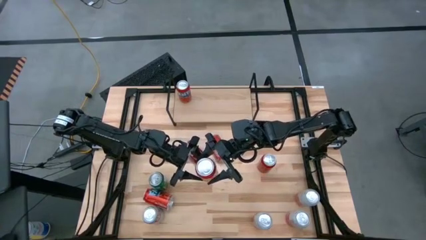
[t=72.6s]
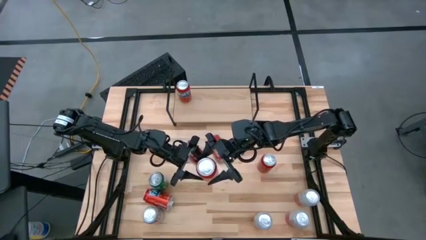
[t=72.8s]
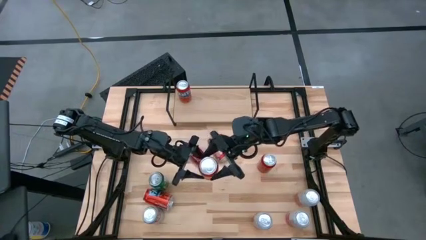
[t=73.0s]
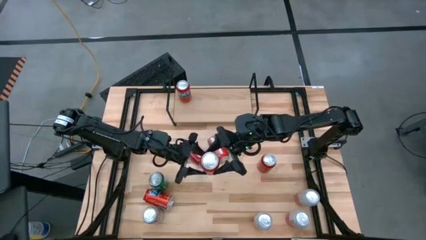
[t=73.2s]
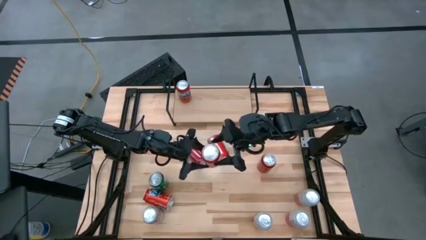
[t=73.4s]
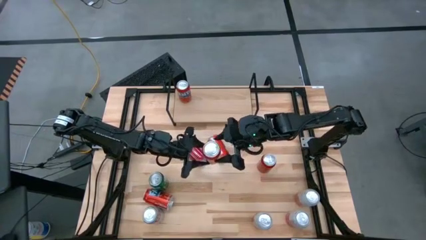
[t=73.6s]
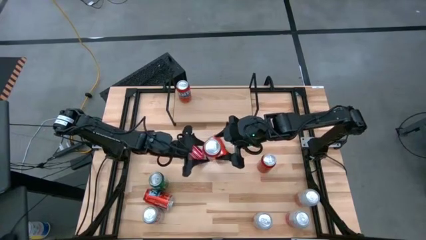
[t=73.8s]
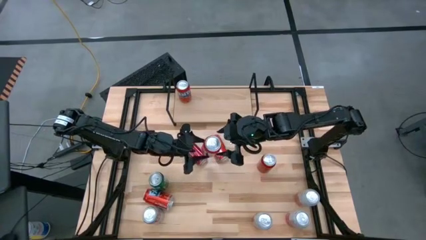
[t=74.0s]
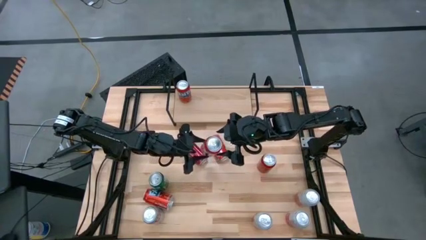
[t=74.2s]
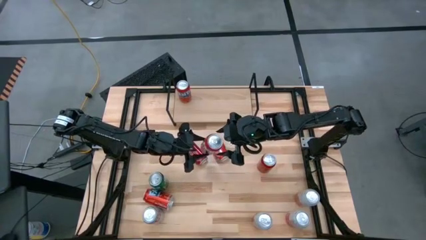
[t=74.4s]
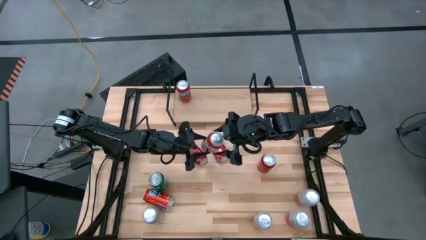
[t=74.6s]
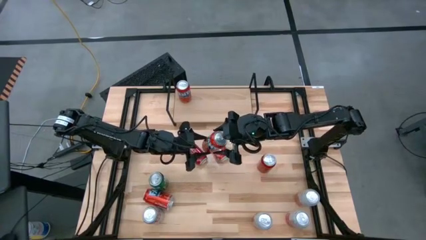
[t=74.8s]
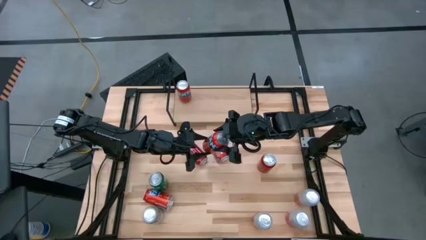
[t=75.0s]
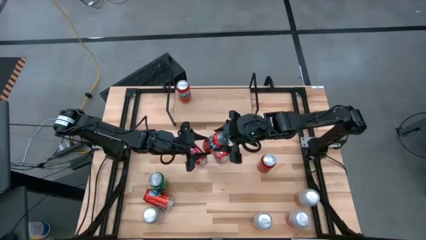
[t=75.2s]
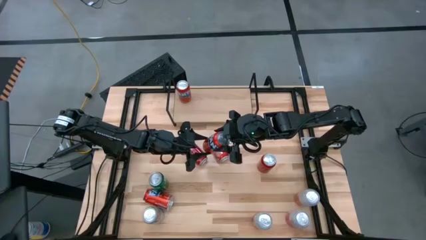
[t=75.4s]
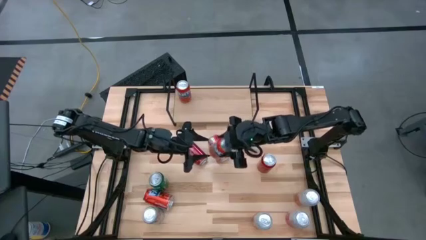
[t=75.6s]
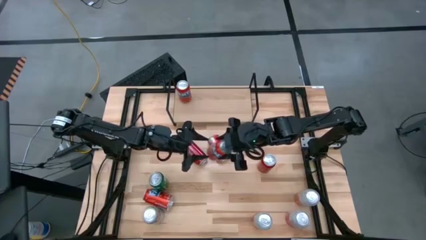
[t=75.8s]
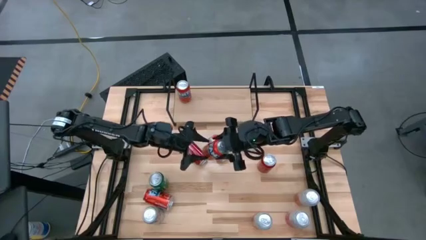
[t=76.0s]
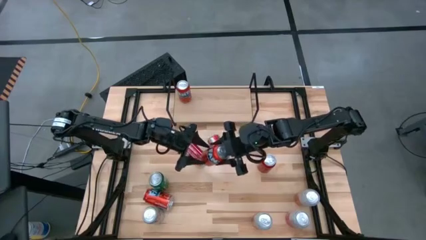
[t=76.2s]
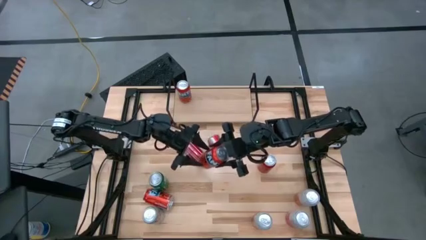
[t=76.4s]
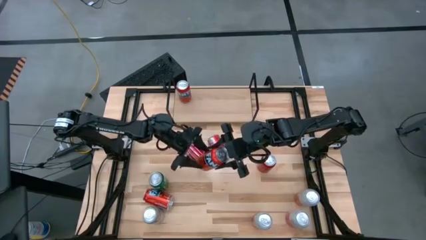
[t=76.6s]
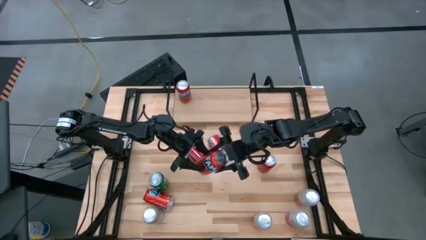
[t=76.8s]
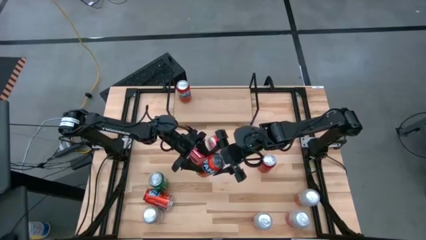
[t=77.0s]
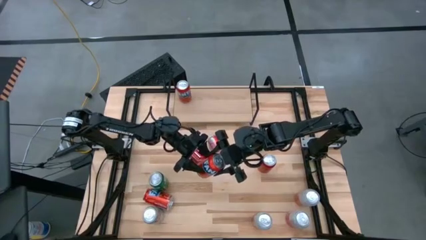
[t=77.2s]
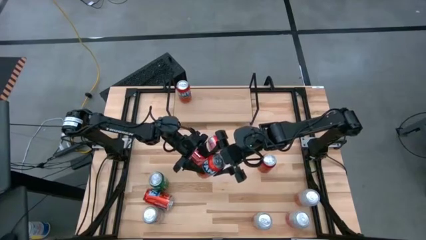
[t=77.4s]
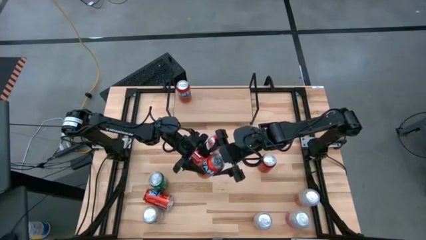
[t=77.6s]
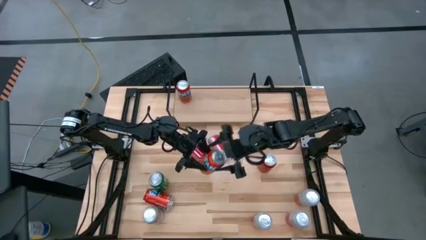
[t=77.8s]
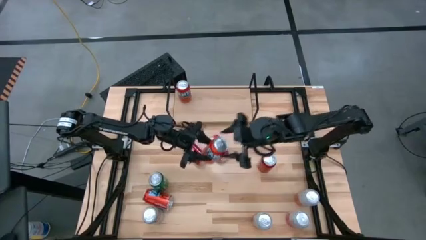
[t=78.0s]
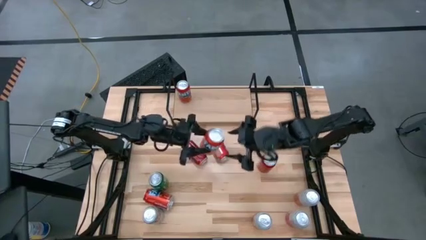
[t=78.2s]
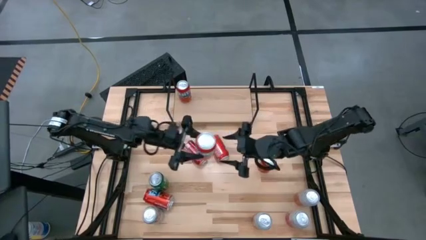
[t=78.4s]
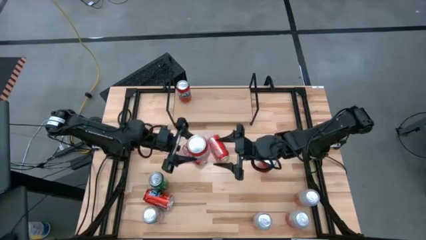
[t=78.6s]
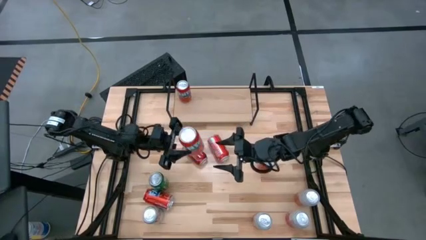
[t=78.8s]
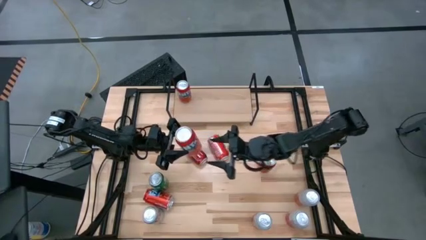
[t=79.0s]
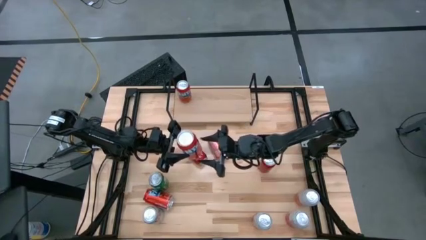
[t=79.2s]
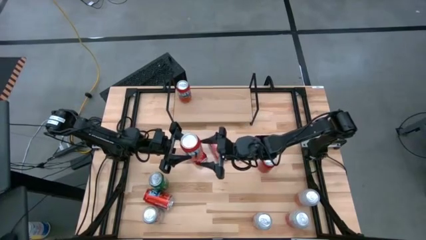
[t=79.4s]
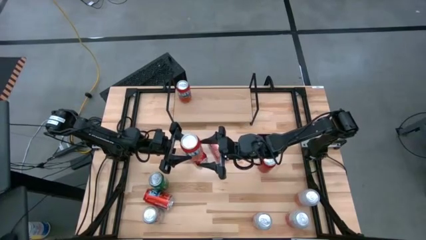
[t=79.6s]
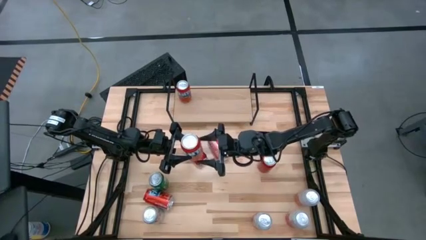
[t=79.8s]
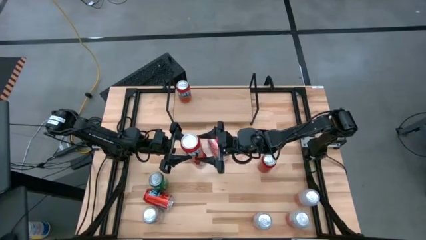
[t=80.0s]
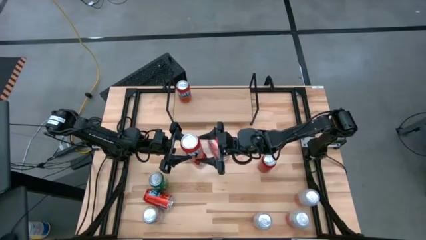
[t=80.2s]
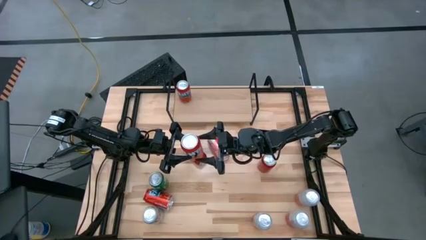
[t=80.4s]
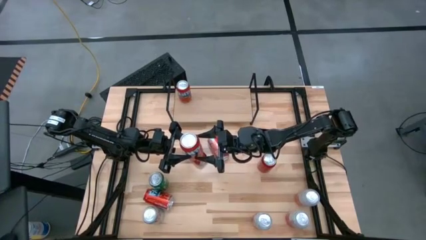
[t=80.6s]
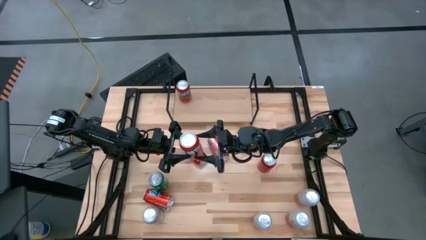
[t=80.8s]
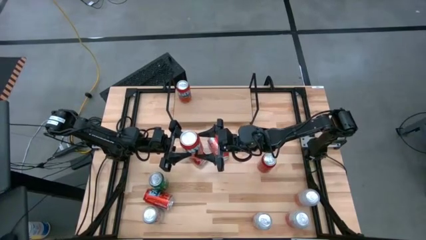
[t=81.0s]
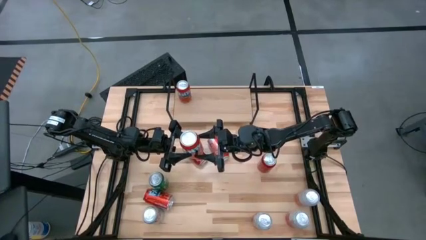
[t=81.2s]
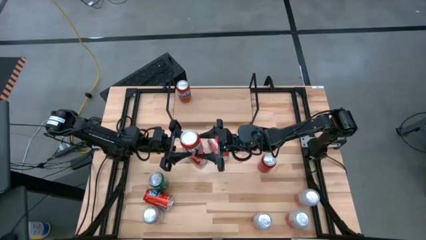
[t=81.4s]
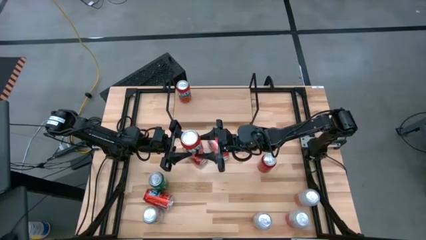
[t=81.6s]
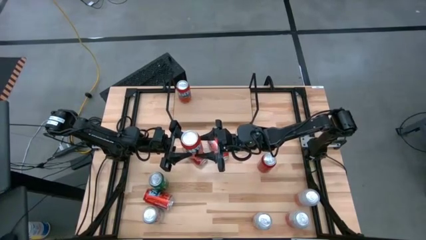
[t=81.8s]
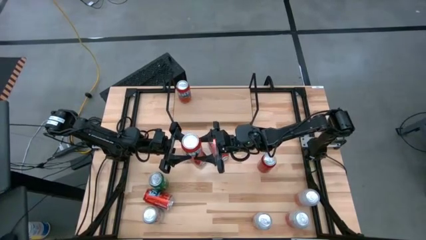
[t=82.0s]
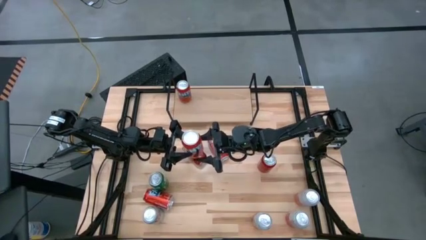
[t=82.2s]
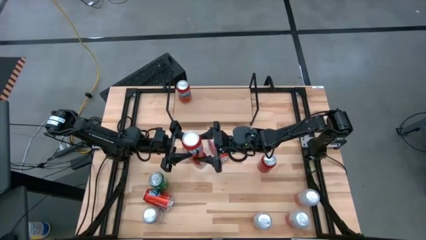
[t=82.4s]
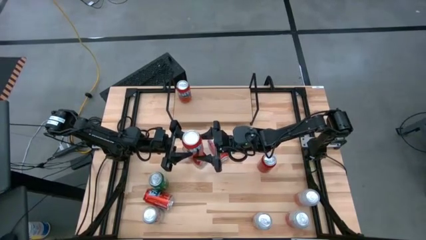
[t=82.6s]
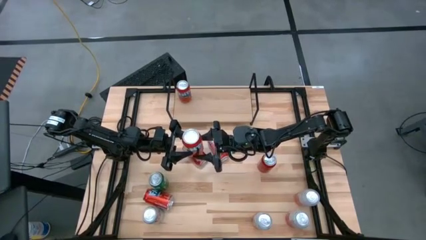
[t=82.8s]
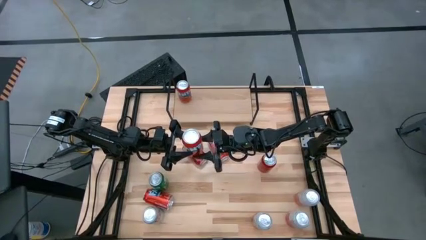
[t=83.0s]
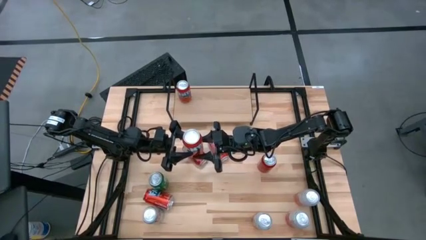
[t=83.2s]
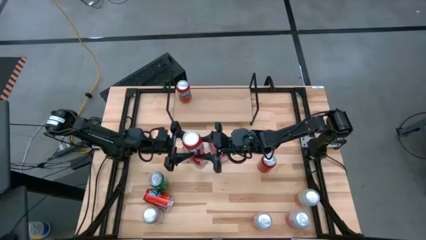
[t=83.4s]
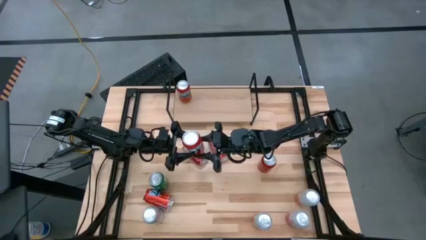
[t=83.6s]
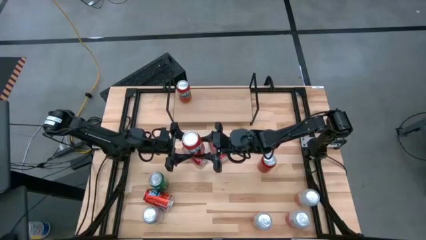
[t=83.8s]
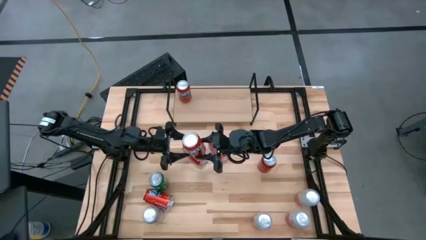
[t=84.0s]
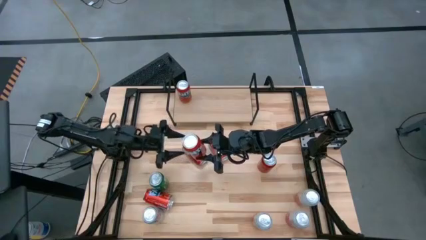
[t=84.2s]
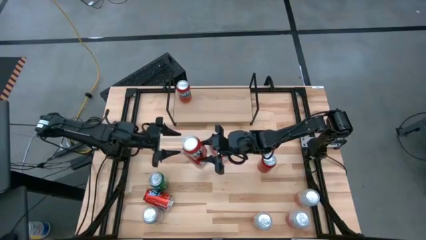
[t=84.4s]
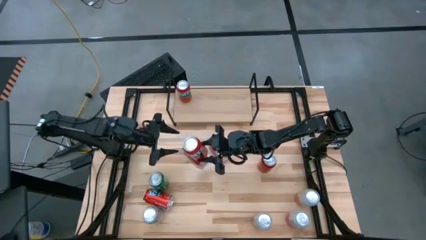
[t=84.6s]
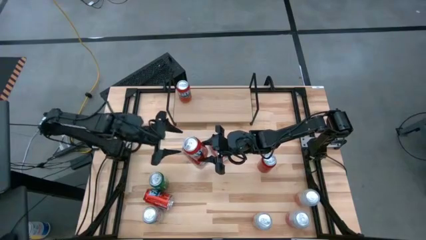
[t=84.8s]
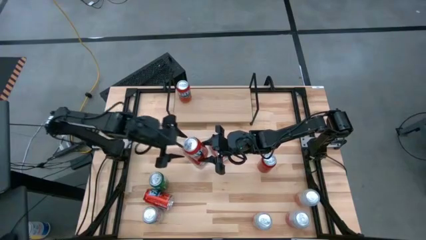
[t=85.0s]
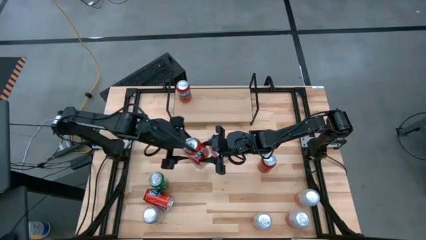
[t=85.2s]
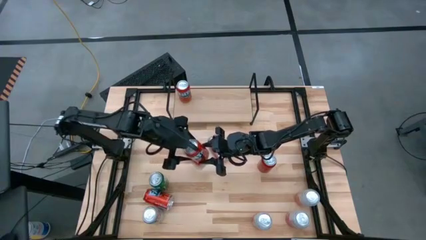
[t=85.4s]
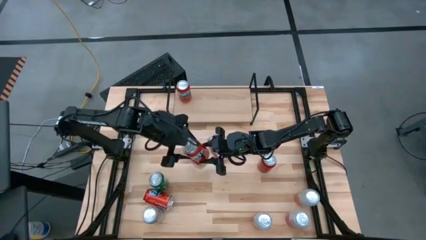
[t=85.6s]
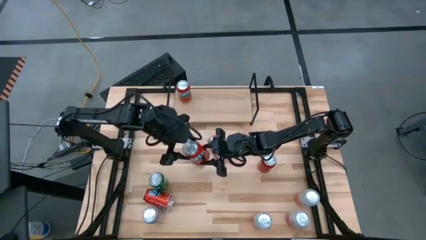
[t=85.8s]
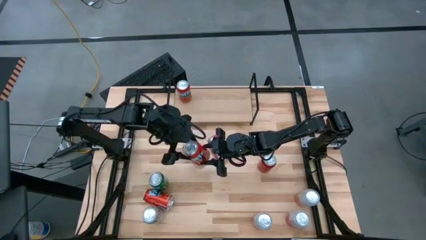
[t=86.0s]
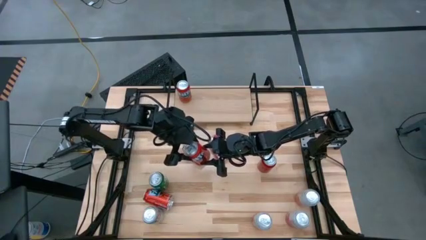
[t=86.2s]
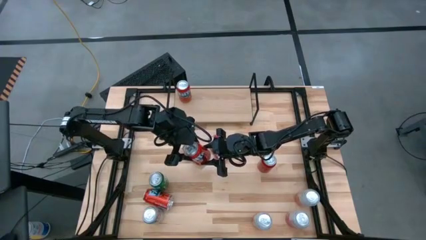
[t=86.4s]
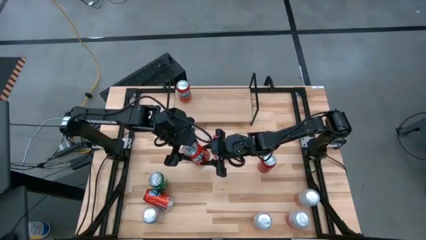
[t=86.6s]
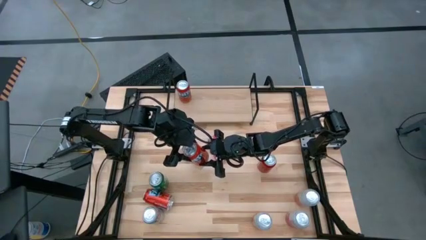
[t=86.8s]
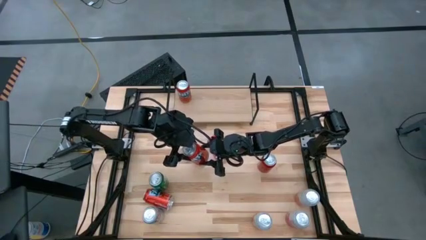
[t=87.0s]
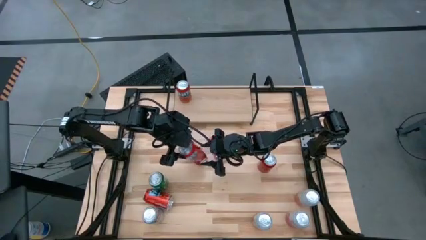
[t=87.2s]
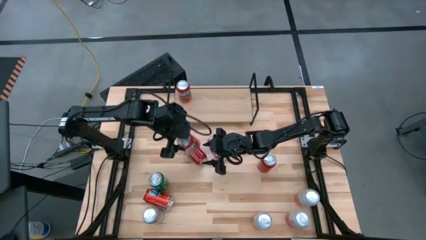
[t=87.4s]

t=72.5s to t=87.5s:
Task: Place canned beverage on shelf
Put the red soda can on the shelf and align with the other red soda can
